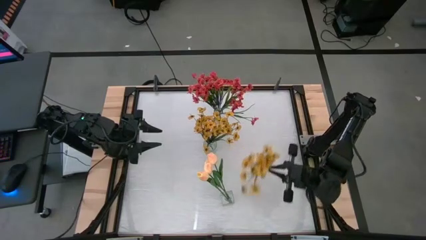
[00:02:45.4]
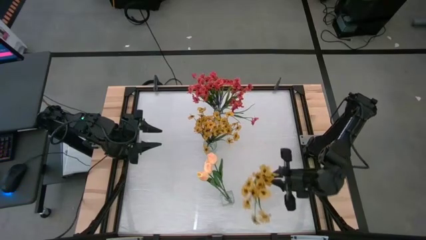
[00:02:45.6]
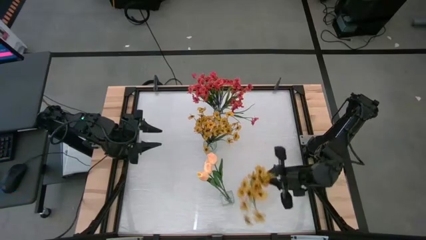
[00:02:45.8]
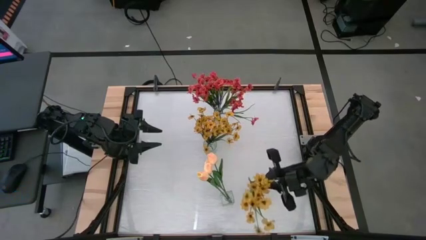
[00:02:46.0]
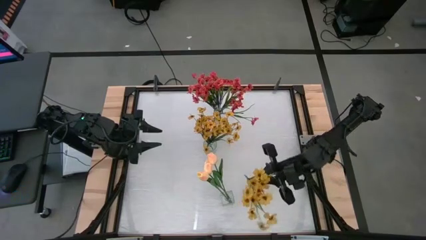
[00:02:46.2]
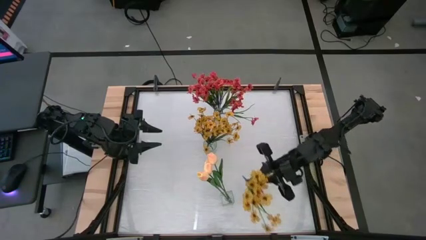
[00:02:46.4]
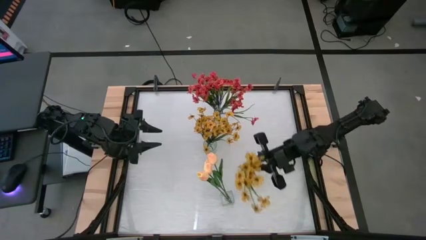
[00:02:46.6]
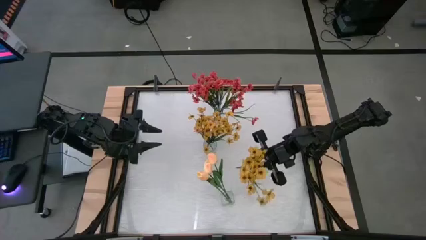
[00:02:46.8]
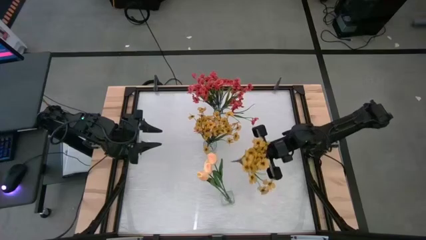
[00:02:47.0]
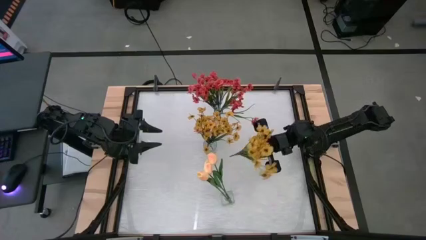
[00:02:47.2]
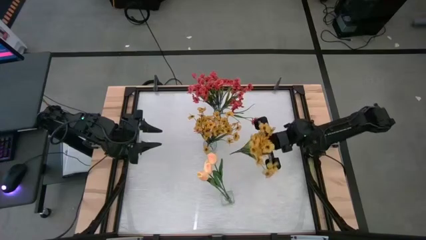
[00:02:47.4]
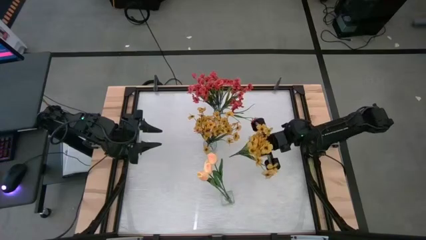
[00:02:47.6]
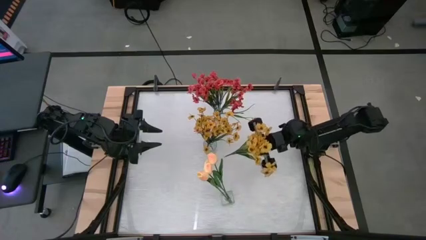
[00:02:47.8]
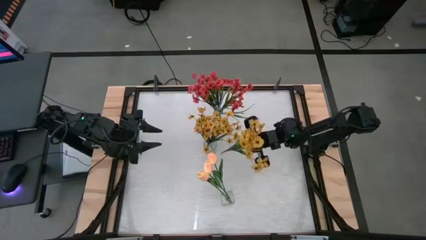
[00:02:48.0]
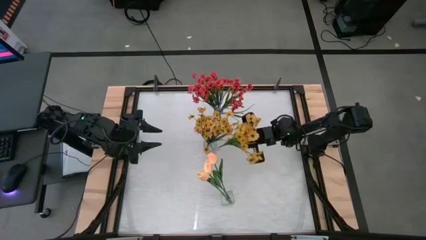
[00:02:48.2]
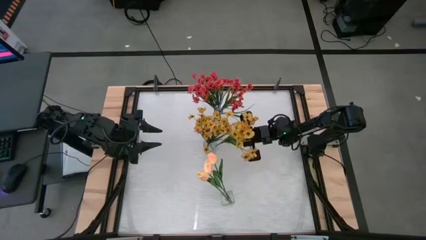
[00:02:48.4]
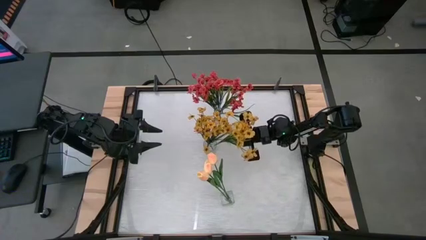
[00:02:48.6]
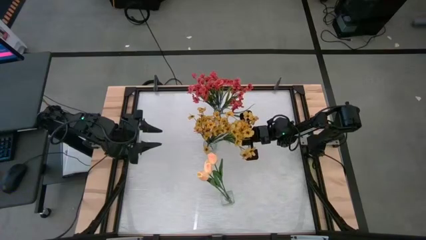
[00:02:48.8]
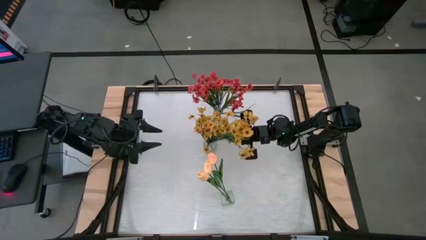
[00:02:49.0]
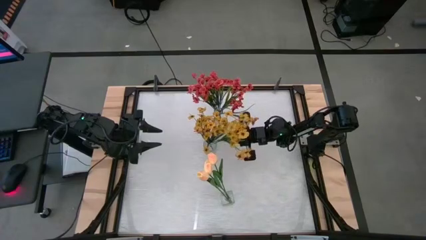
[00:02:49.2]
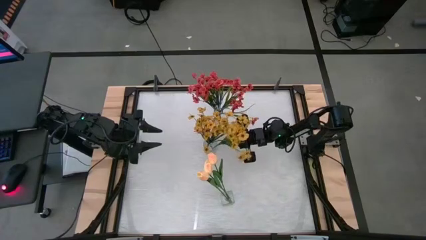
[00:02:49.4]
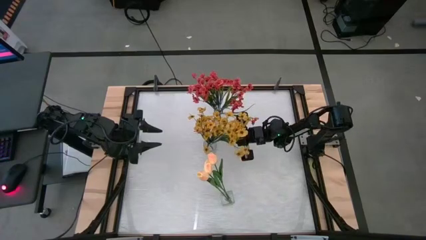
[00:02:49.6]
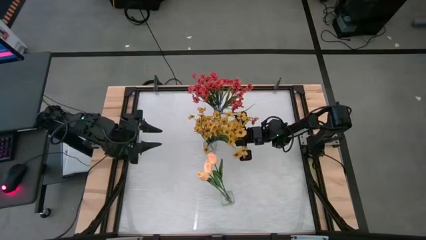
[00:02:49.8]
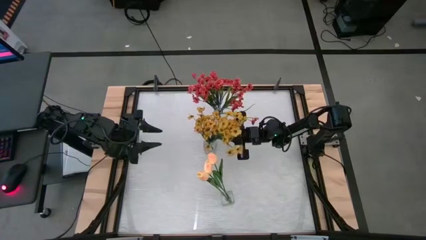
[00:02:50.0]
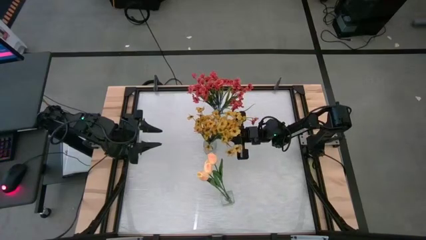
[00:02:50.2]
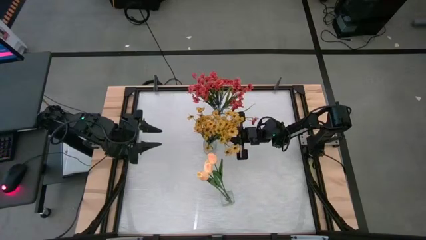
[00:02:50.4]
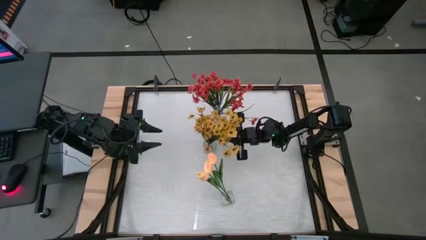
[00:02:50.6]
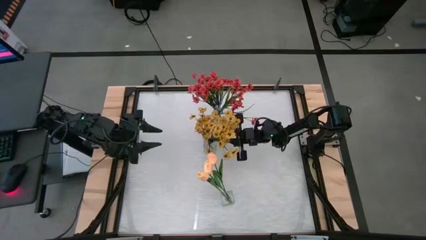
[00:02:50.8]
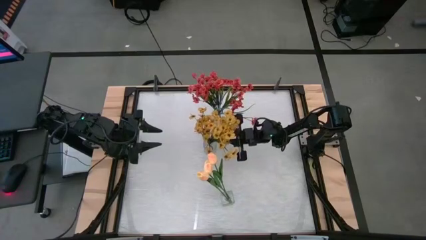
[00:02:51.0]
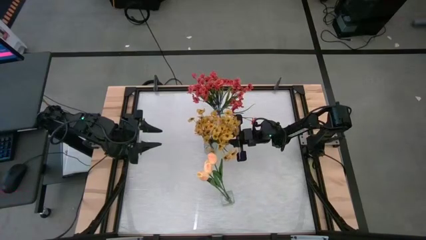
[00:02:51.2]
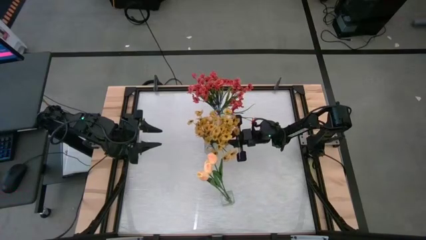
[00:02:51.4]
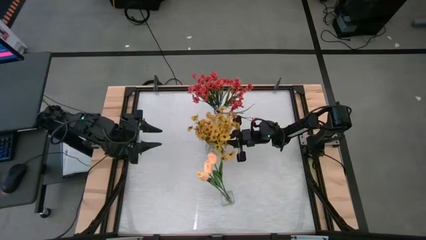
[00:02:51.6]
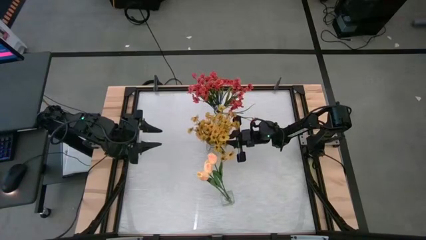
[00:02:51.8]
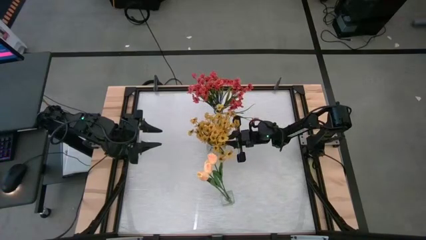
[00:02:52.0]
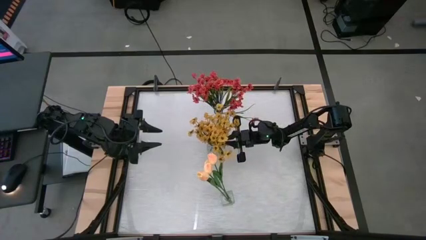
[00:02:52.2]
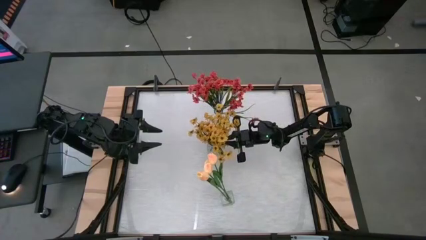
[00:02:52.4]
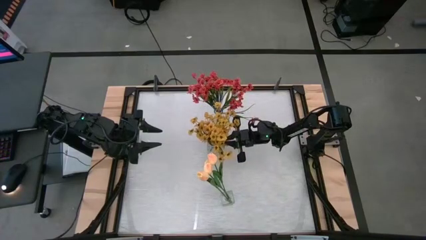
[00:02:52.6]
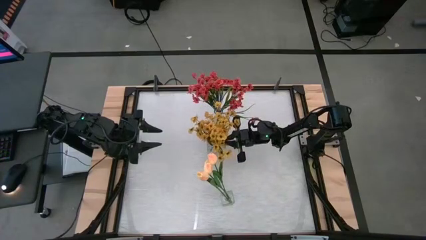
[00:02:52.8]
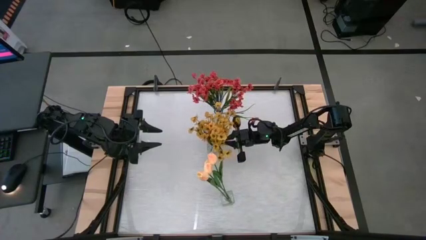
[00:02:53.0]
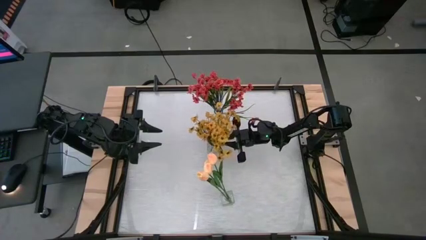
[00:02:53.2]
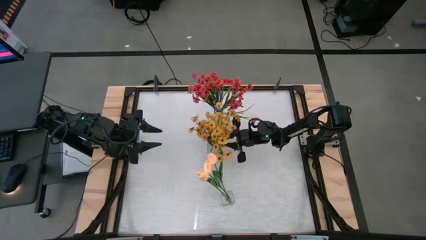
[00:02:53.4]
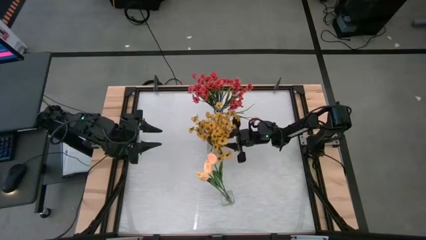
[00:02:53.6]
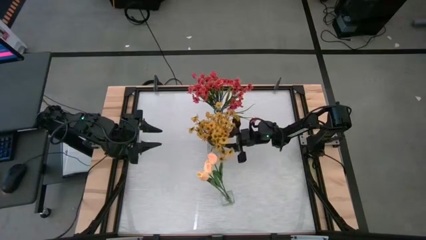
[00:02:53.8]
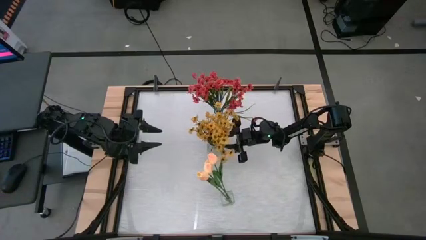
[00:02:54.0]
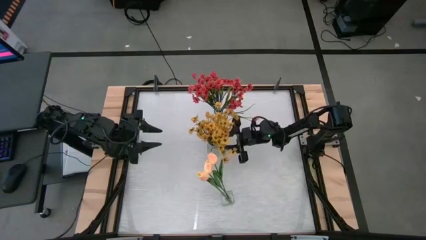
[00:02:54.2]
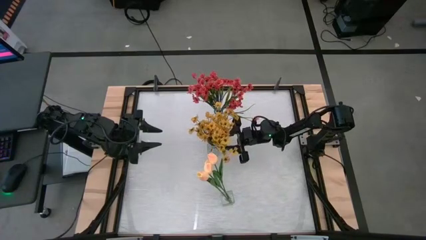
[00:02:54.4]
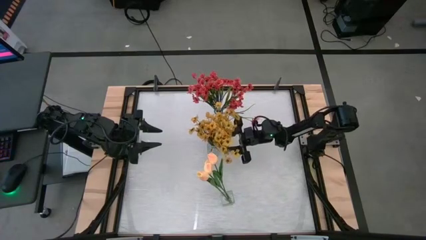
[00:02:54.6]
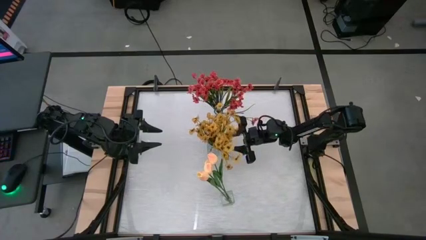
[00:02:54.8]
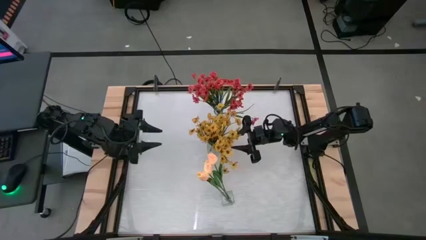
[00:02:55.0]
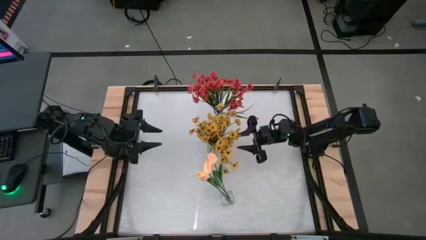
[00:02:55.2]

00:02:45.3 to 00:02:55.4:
Task: Sort flowers into vase by color
Put the yellow flowers into the middle transparent vase

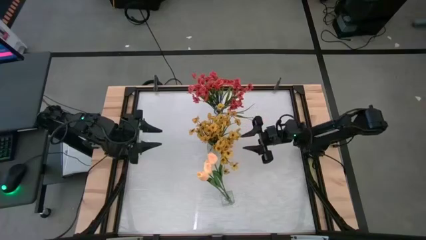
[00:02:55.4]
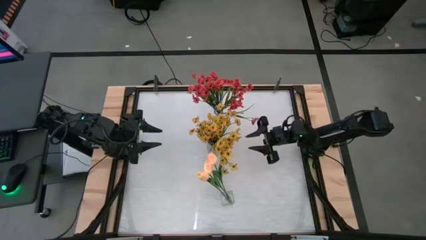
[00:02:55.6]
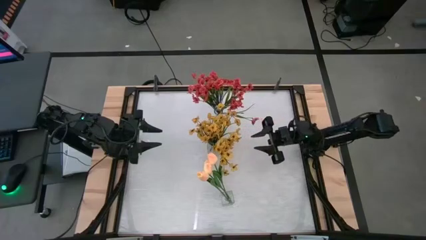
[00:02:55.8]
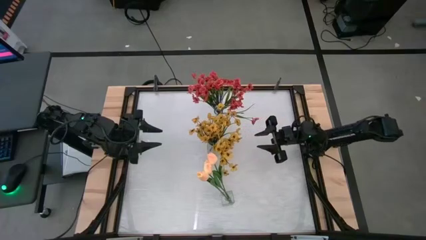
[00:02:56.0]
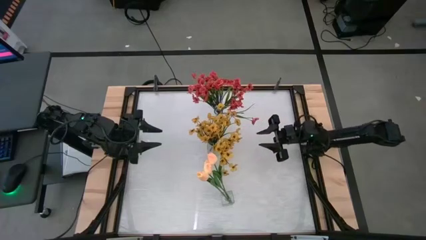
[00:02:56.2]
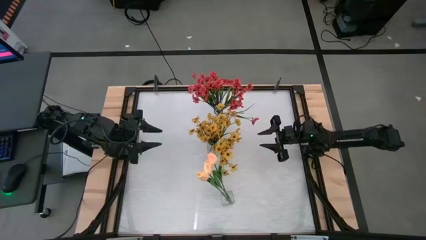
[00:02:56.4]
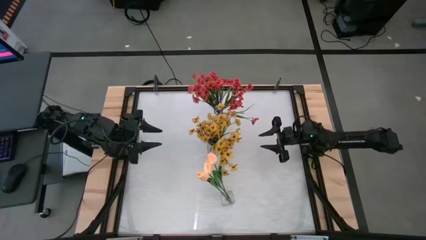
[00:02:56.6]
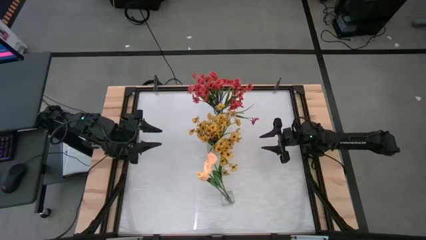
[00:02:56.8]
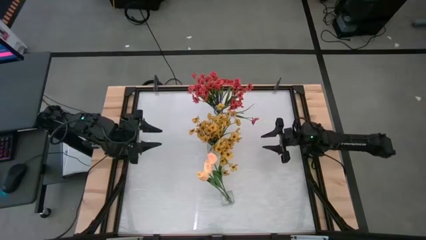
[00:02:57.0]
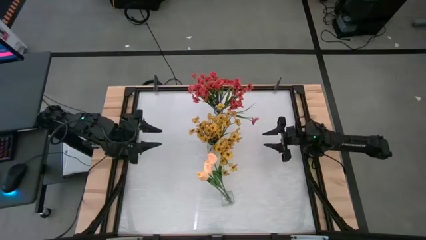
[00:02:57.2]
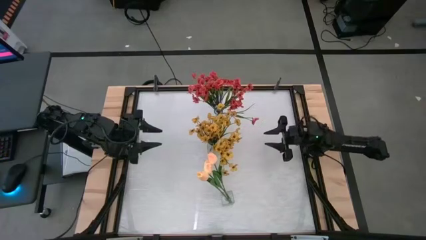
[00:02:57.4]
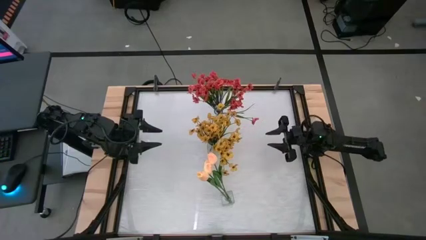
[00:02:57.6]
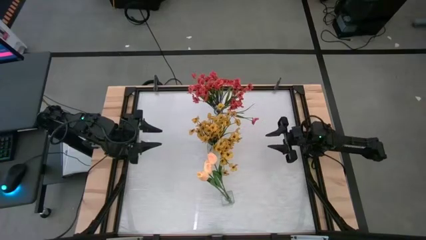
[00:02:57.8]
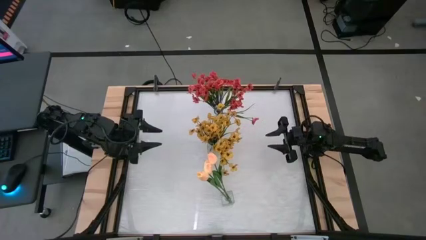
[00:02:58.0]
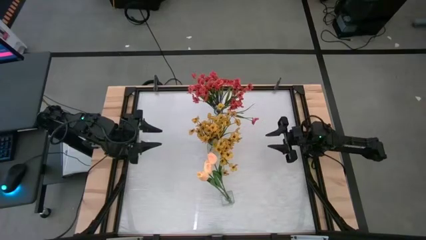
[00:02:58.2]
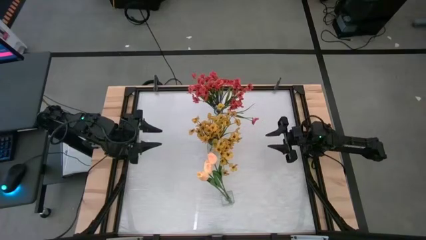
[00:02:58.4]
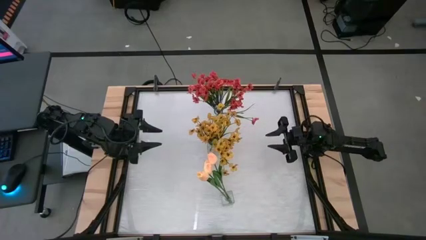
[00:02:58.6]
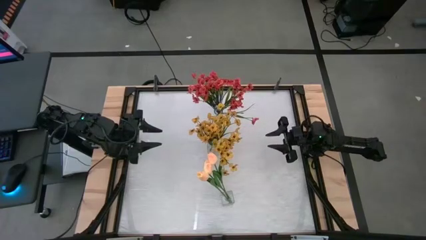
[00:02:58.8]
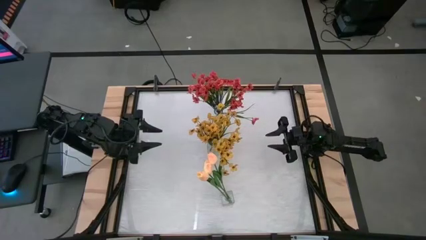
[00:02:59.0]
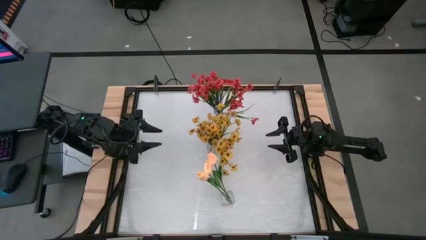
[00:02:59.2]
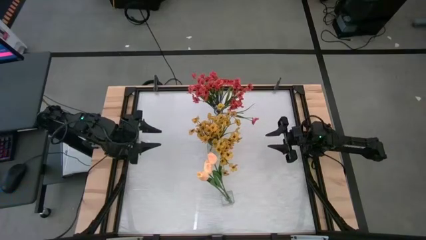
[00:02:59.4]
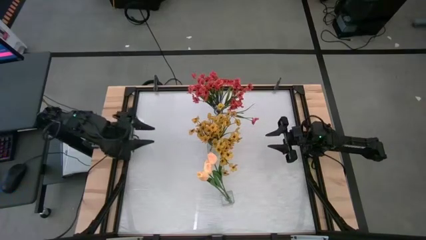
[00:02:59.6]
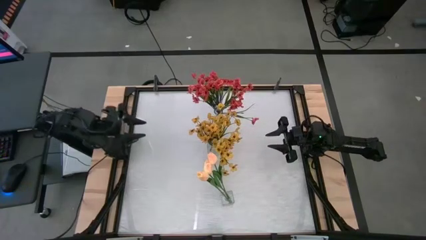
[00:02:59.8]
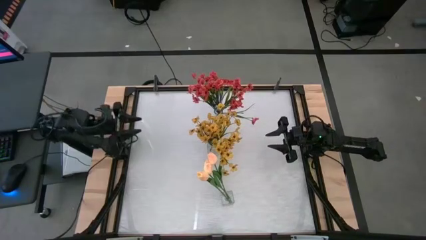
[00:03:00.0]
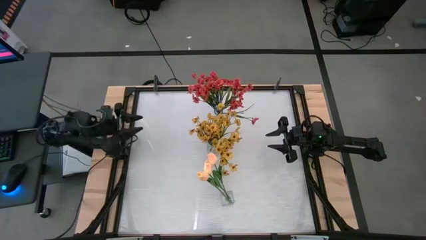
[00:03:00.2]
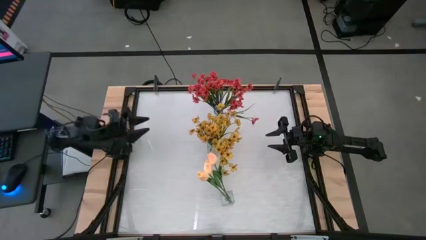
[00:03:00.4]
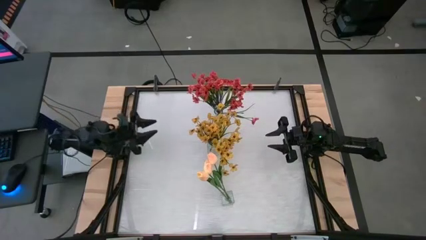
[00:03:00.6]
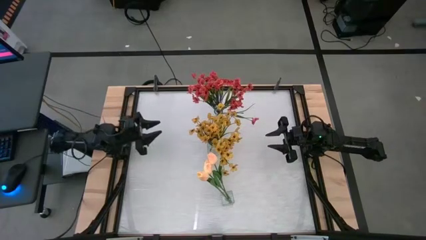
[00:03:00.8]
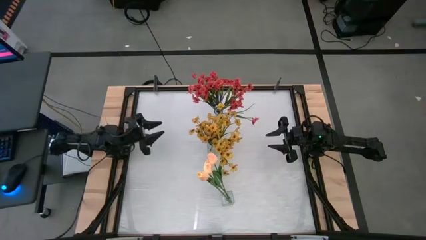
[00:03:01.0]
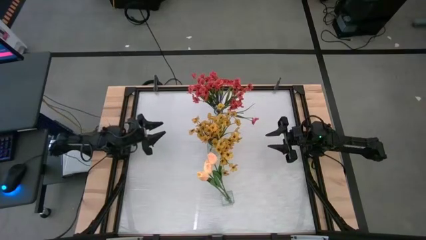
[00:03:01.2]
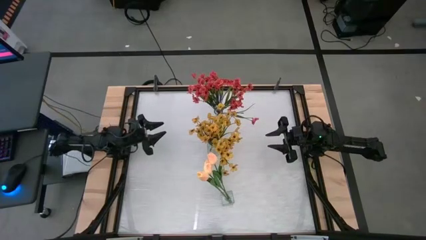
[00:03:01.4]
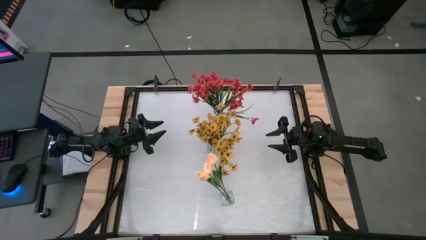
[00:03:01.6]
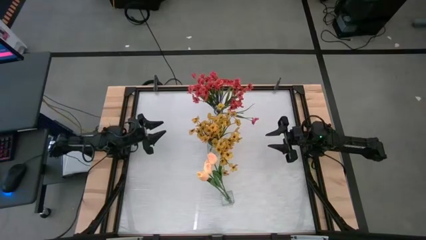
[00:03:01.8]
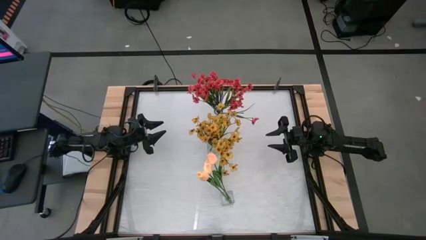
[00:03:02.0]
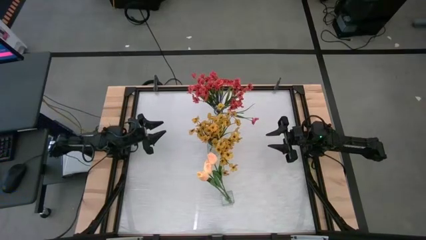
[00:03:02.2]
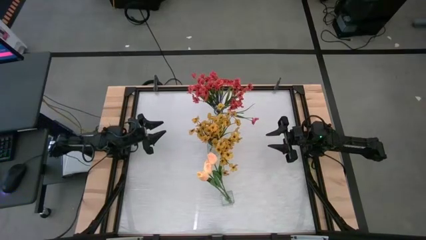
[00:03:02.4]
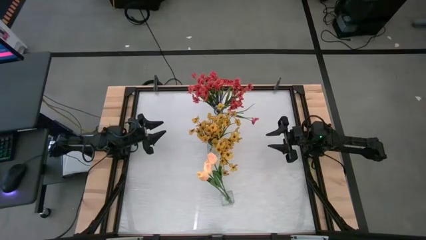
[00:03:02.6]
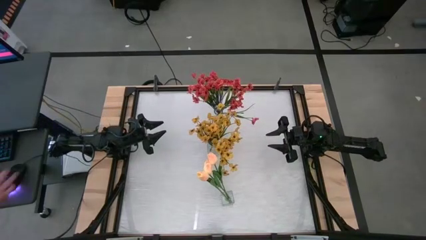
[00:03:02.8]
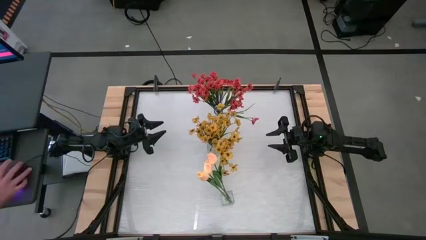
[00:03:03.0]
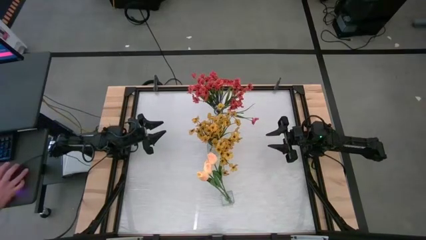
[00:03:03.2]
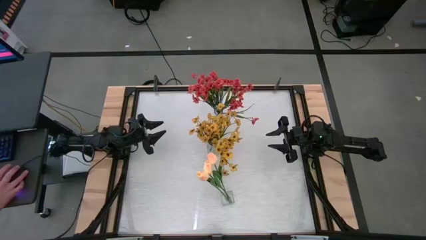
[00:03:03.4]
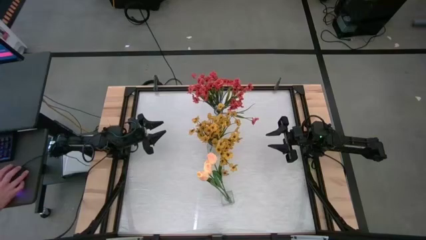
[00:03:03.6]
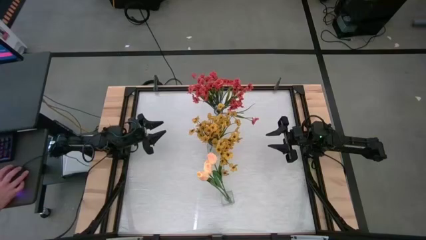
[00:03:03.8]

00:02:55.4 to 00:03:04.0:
Return to Home Position
